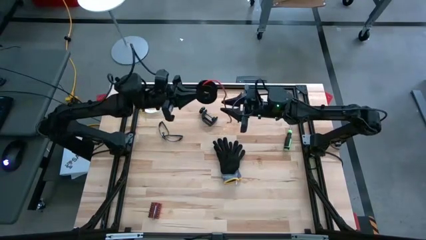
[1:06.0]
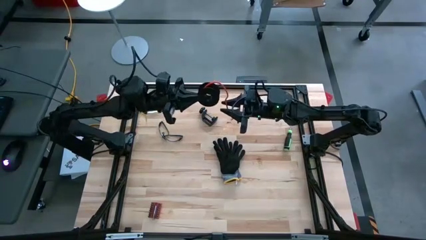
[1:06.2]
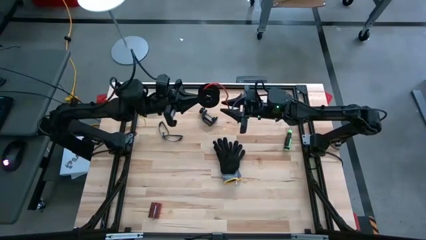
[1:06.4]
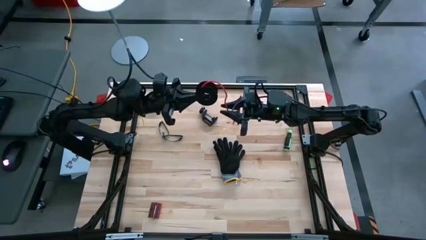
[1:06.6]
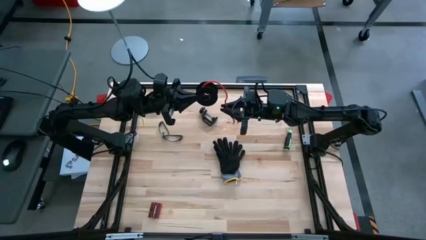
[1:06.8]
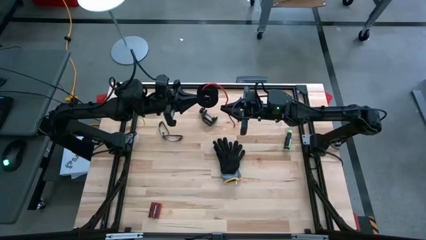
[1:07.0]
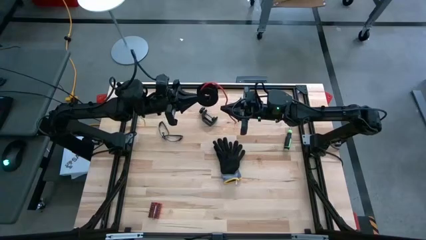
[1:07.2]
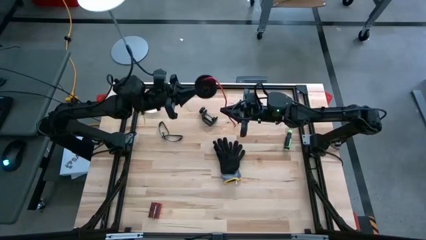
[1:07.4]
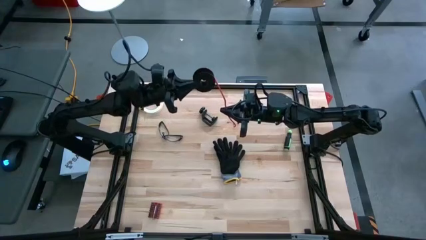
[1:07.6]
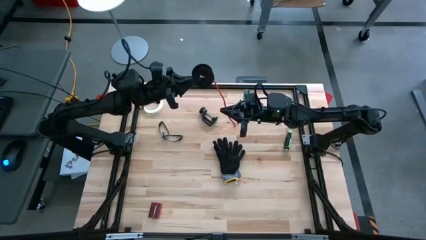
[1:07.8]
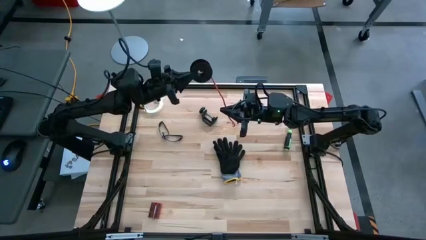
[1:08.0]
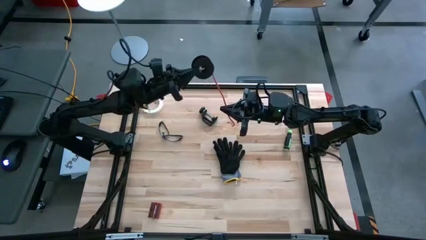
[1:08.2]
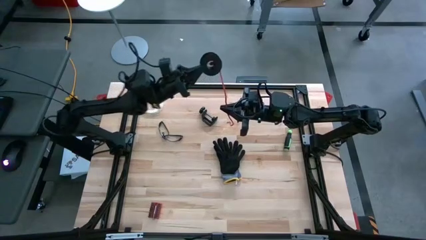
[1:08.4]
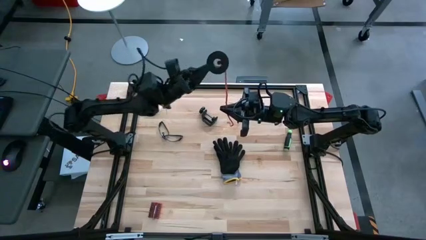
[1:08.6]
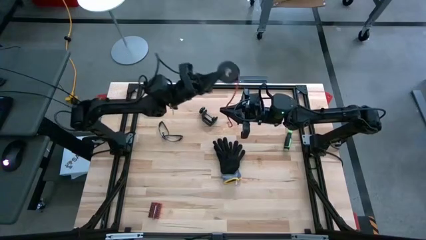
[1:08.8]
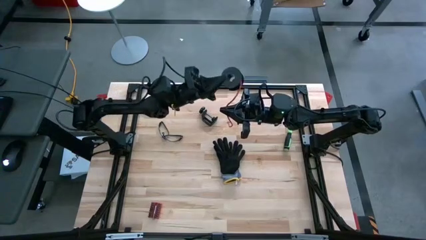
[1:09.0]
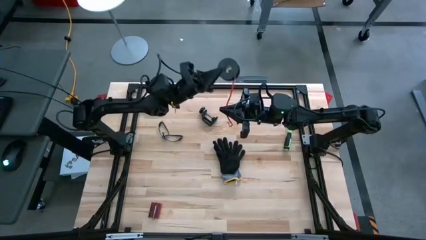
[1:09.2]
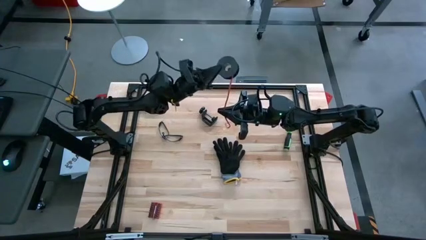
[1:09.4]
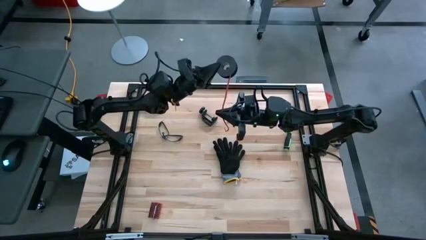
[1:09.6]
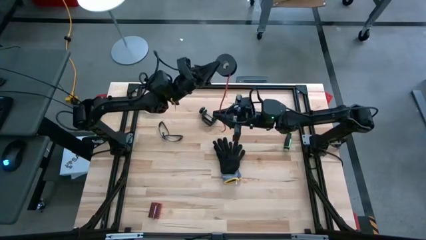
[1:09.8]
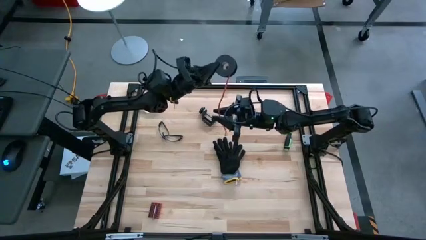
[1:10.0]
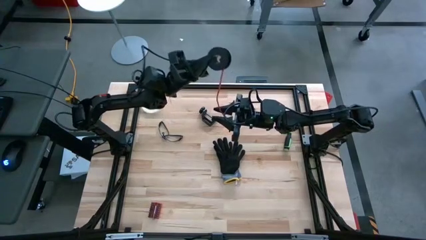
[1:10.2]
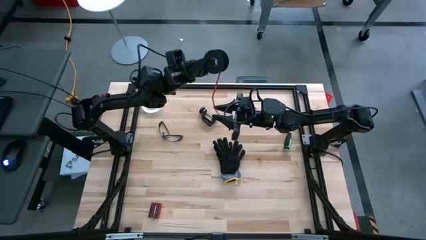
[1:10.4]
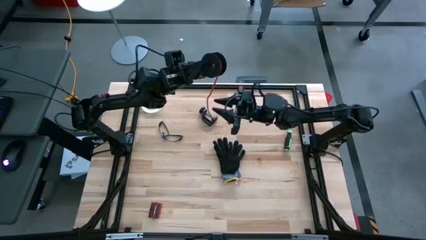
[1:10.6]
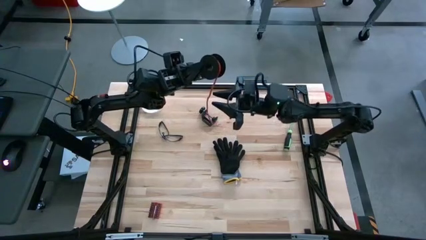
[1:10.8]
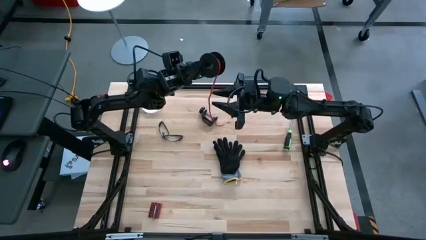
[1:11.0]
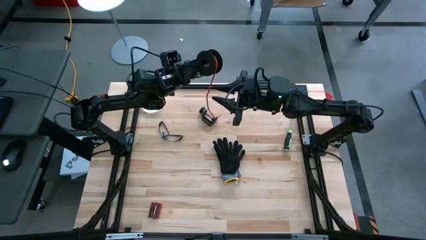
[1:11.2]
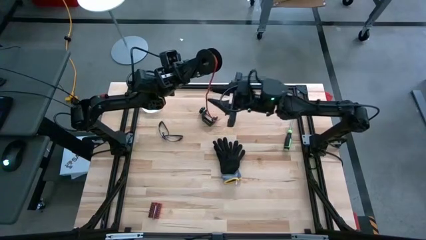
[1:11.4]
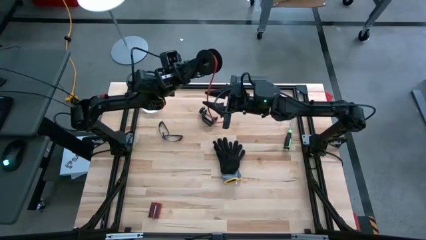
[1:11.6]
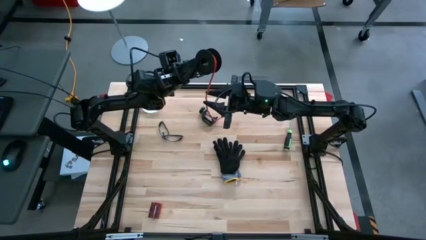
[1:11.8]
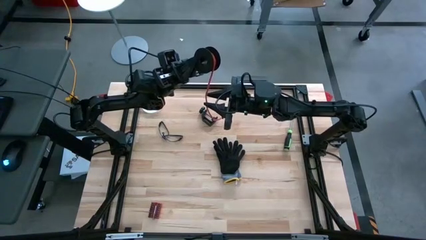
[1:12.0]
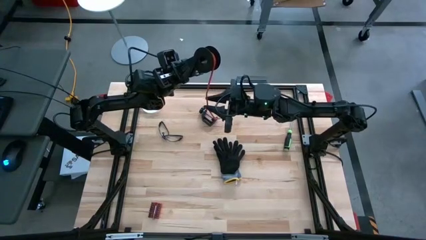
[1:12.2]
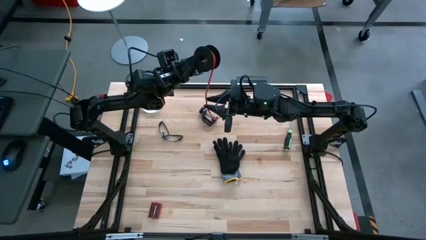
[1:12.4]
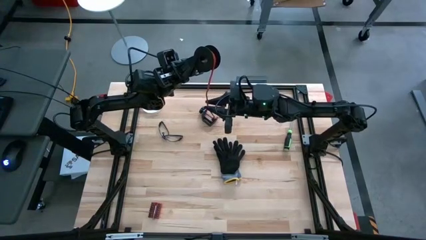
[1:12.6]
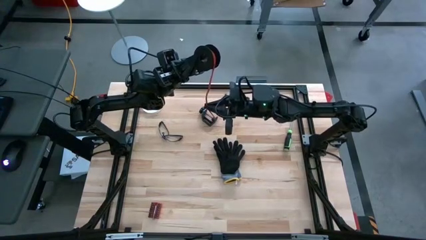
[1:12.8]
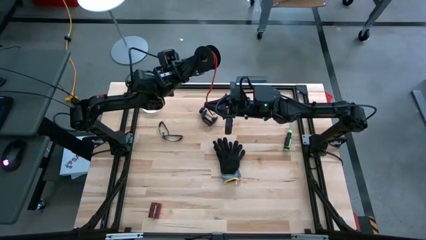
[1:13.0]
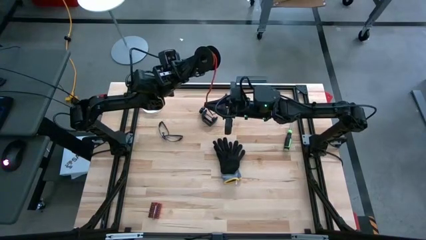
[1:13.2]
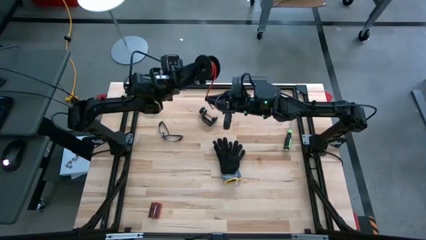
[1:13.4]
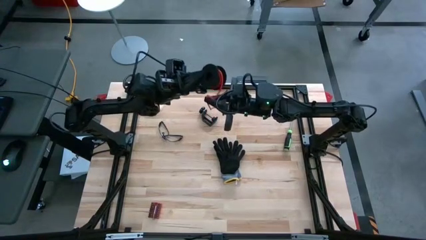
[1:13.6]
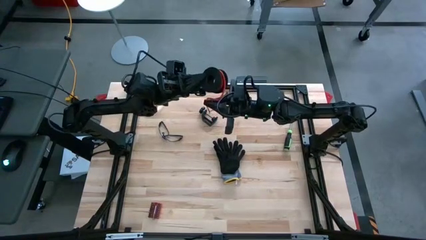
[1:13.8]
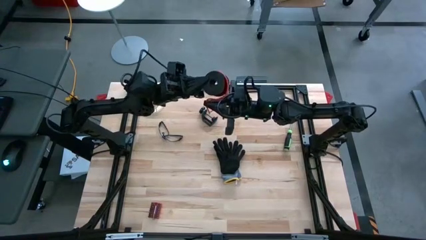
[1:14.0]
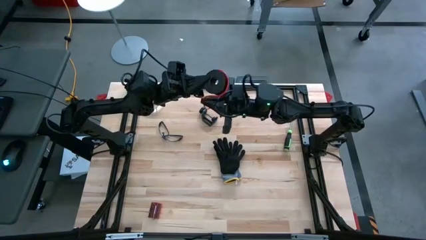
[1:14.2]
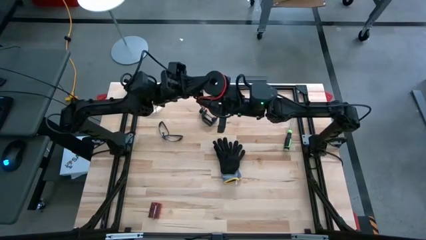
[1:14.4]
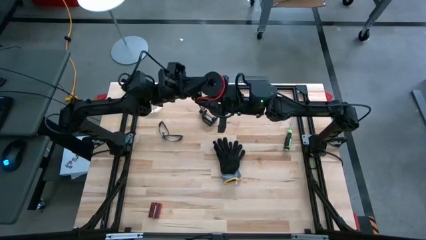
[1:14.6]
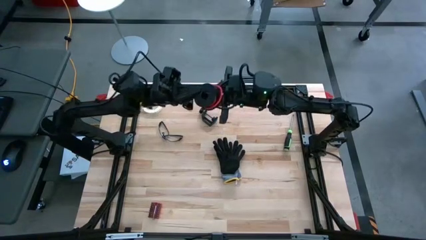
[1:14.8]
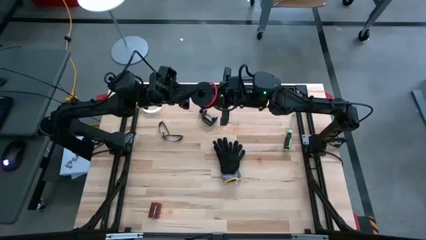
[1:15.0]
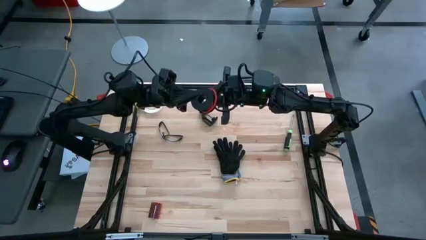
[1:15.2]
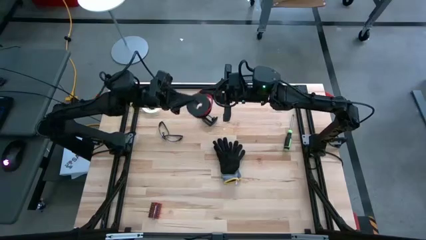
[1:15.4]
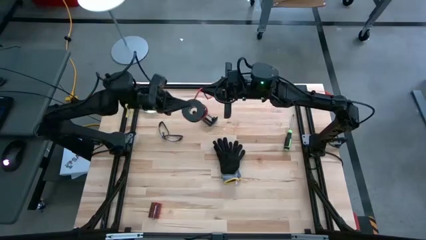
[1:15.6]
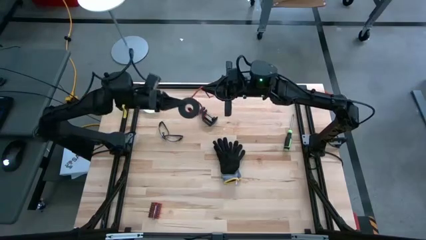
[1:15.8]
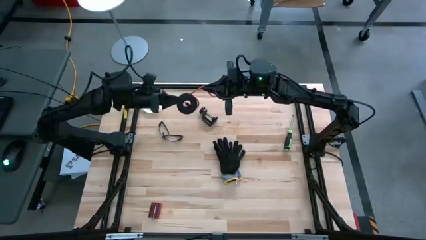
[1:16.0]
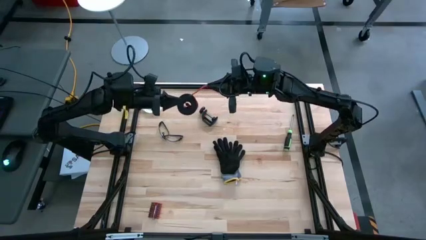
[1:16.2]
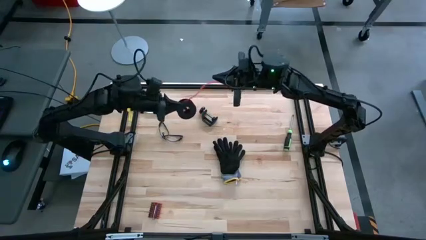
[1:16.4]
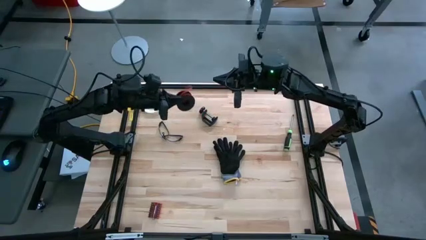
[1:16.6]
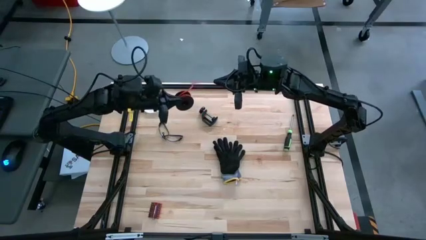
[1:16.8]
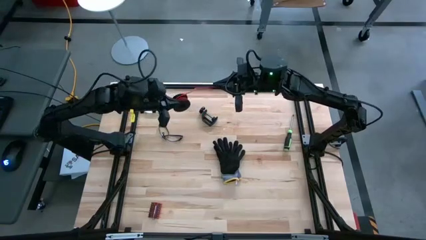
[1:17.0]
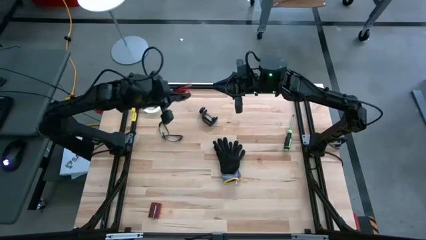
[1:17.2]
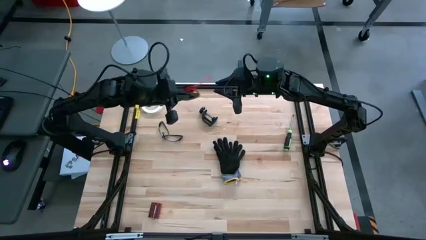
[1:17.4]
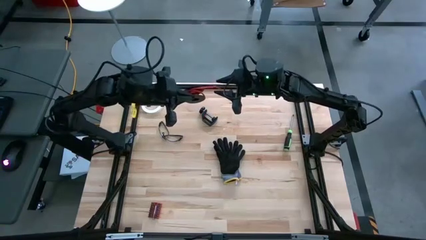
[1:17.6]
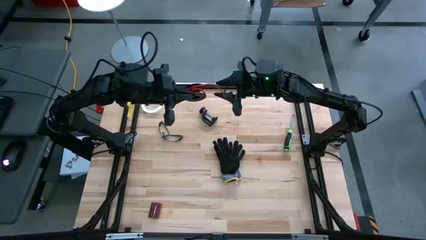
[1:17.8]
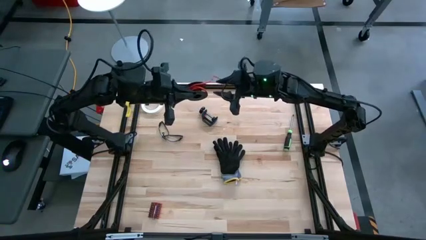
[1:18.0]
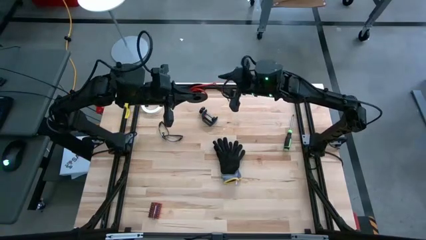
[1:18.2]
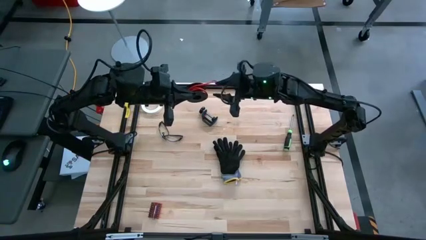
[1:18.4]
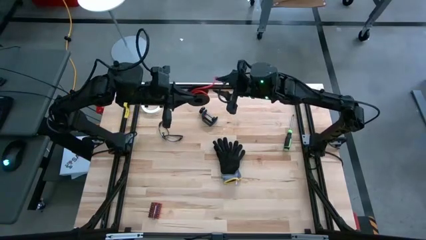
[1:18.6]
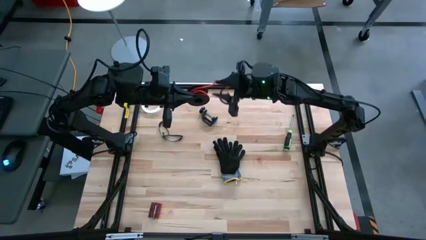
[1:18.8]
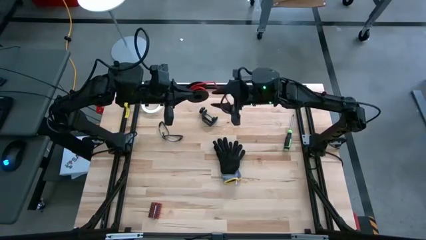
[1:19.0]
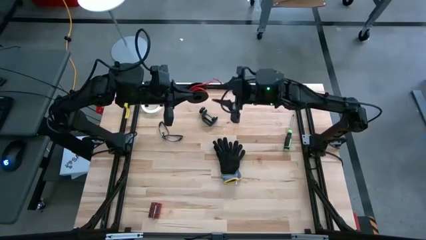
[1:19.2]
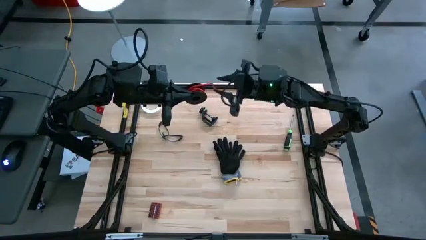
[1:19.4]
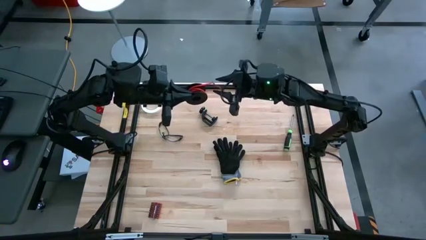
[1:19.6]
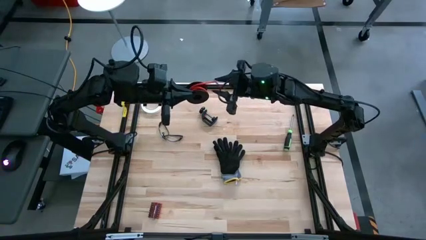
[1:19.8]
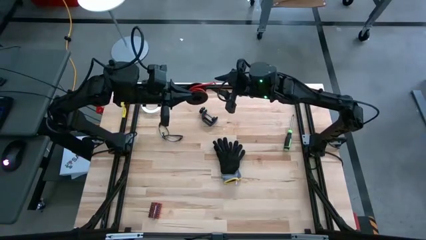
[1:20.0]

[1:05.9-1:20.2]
Task: Coil cords
Coil the orange wire onto the spool

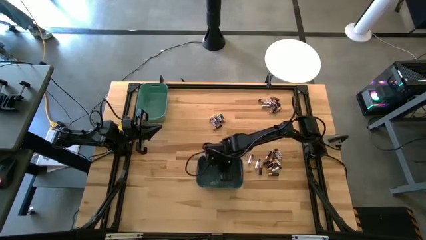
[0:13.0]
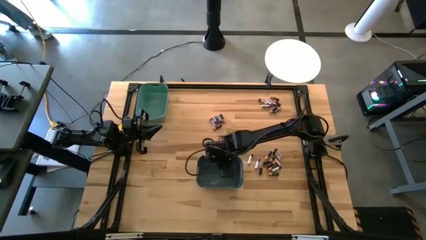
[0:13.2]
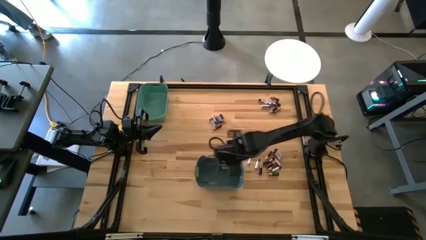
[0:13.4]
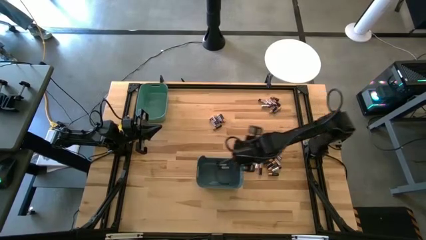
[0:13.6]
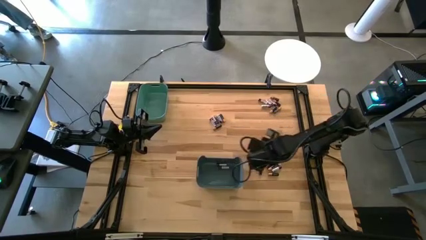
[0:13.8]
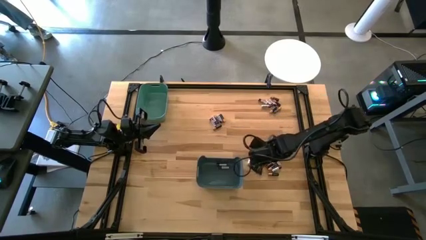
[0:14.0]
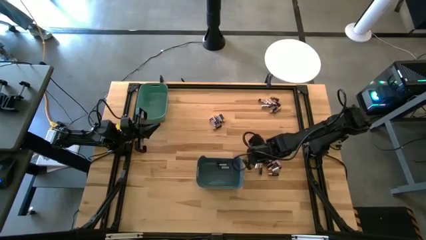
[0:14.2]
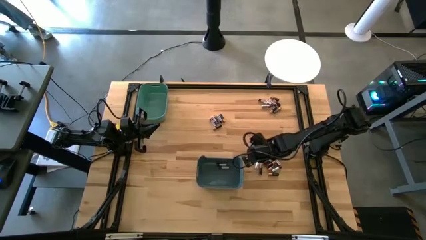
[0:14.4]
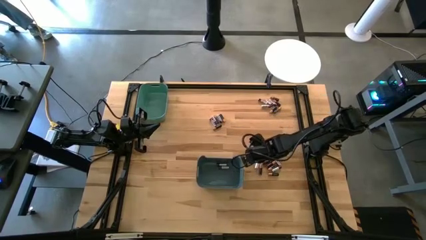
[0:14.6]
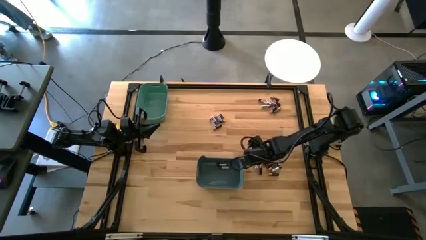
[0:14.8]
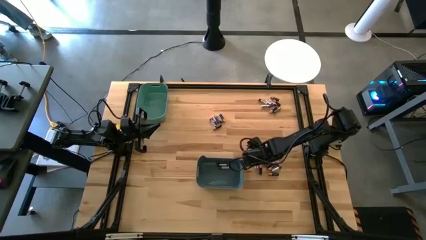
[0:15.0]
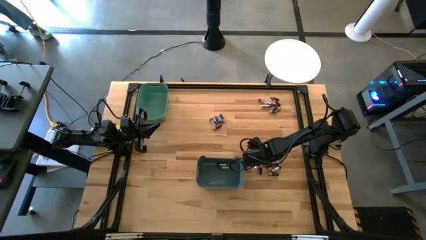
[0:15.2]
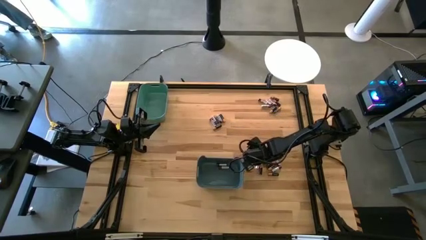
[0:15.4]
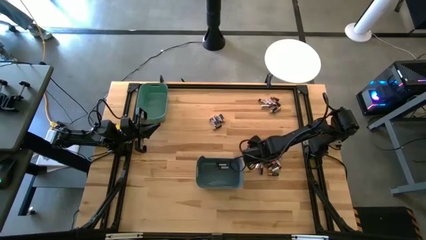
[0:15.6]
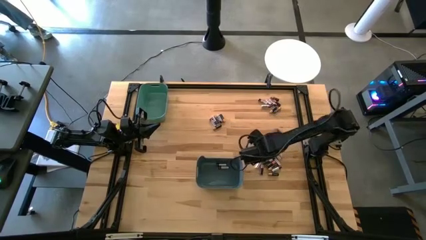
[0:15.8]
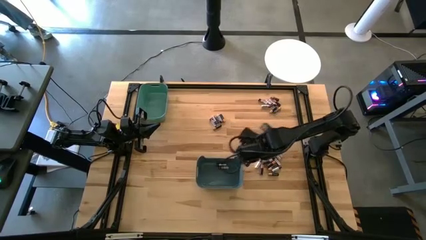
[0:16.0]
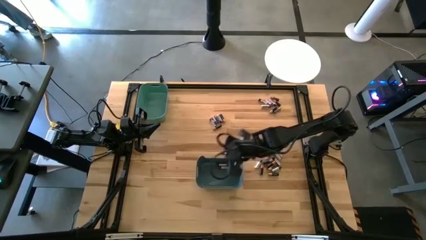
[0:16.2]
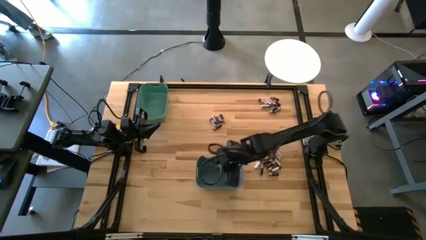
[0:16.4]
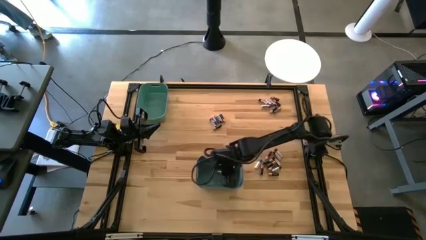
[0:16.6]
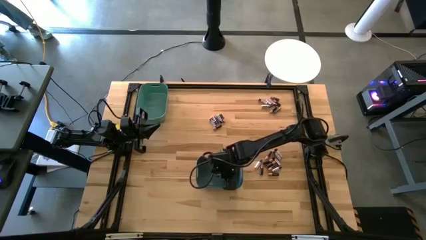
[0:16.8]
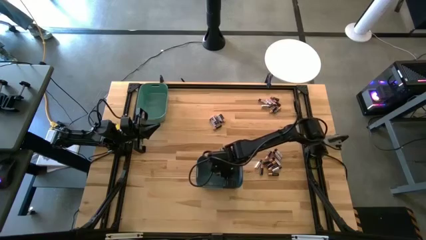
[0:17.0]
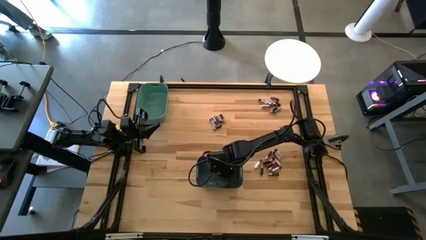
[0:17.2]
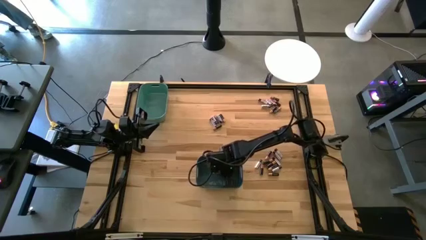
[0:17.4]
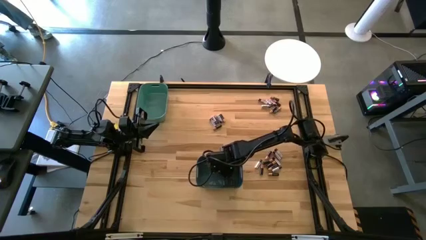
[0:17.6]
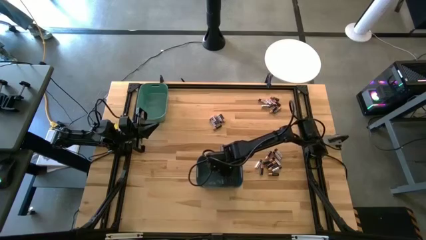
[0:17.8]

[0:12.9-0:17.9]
Task: Sort batteries
Put the silver battery into the blue bin
